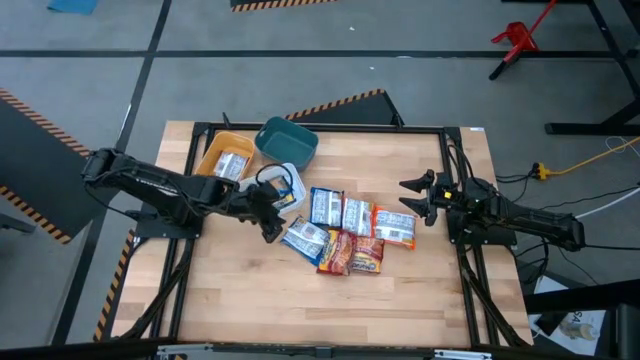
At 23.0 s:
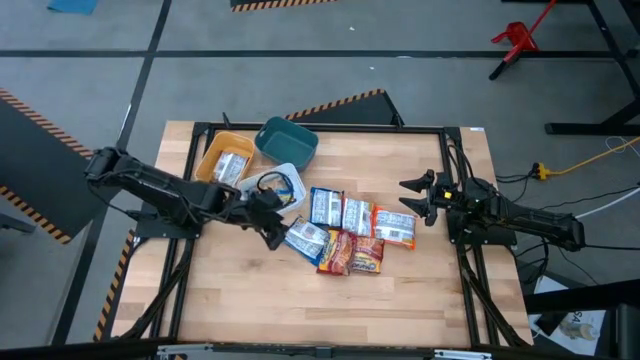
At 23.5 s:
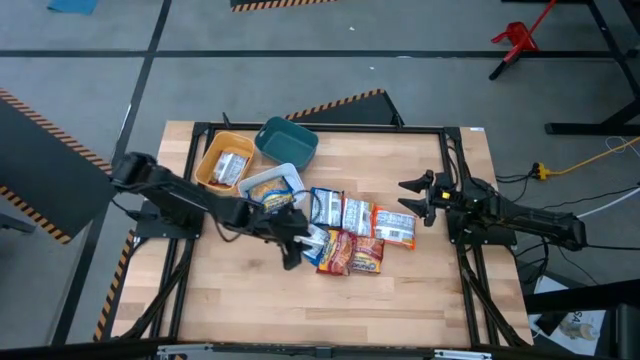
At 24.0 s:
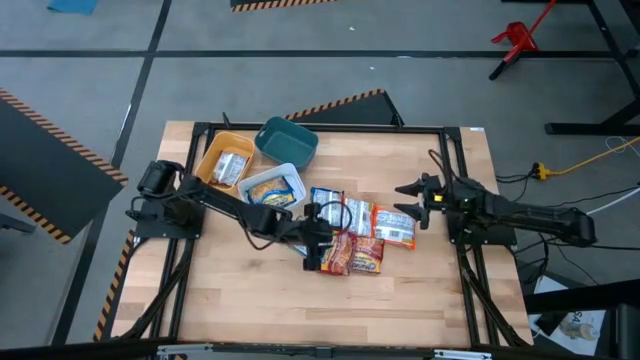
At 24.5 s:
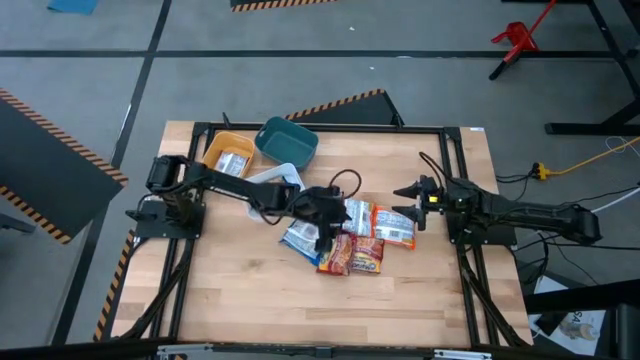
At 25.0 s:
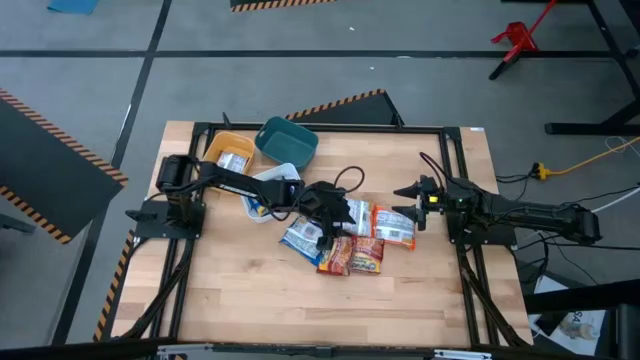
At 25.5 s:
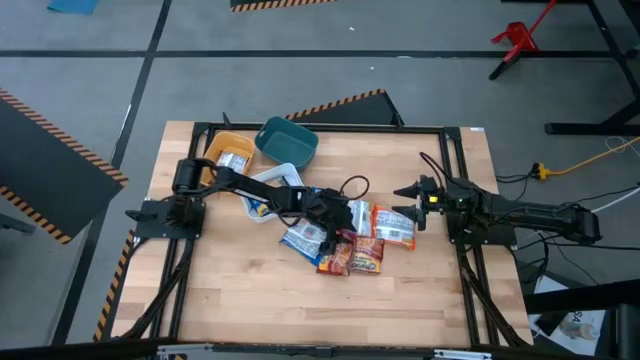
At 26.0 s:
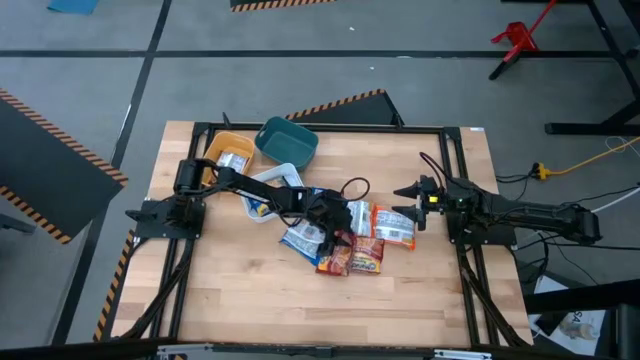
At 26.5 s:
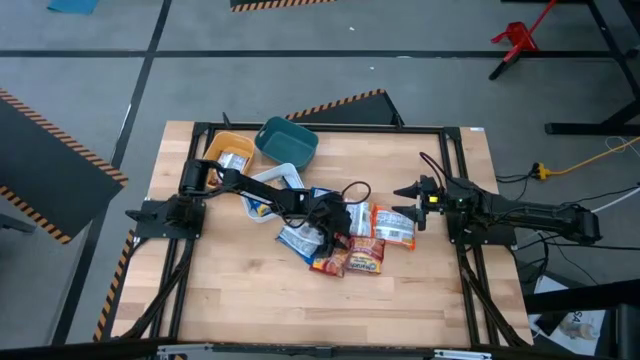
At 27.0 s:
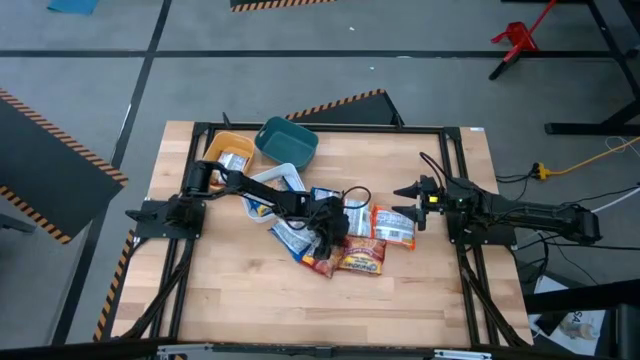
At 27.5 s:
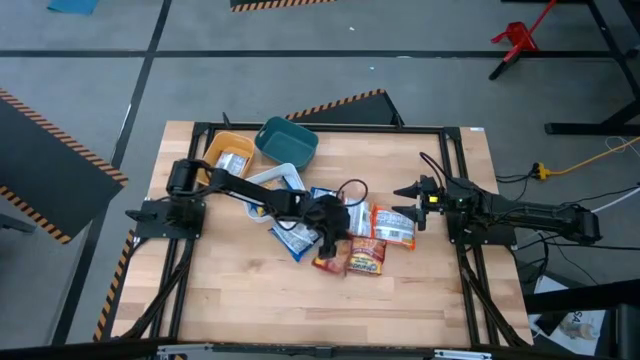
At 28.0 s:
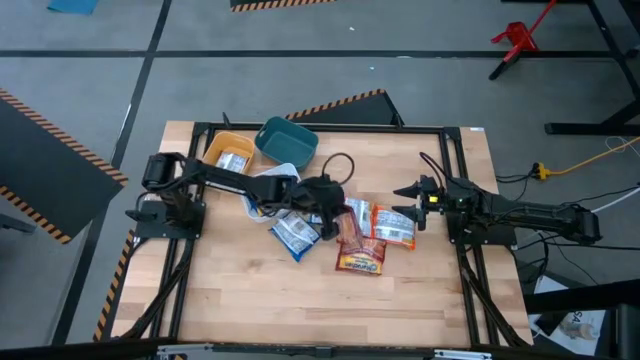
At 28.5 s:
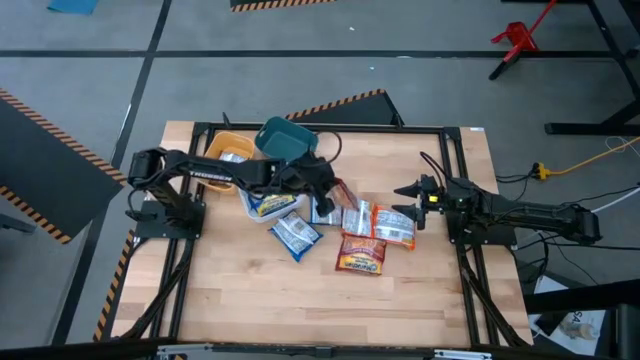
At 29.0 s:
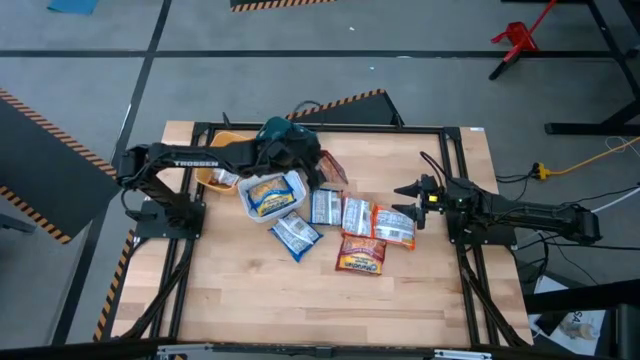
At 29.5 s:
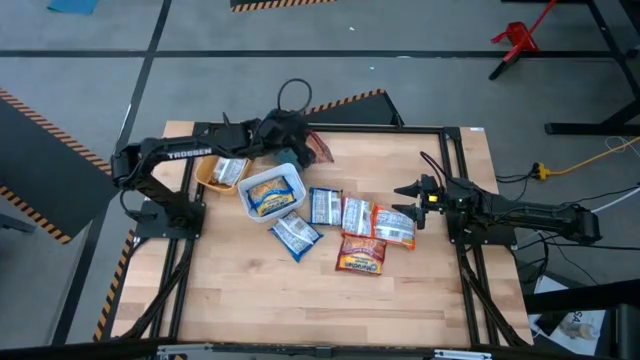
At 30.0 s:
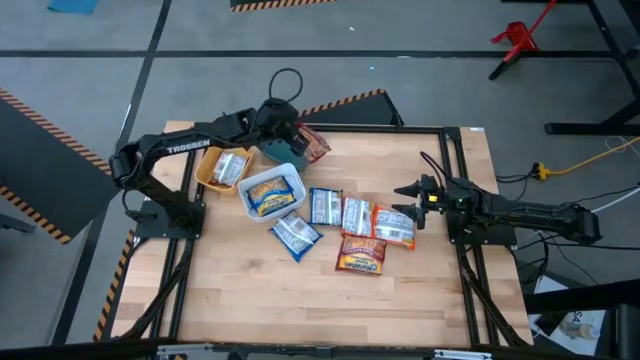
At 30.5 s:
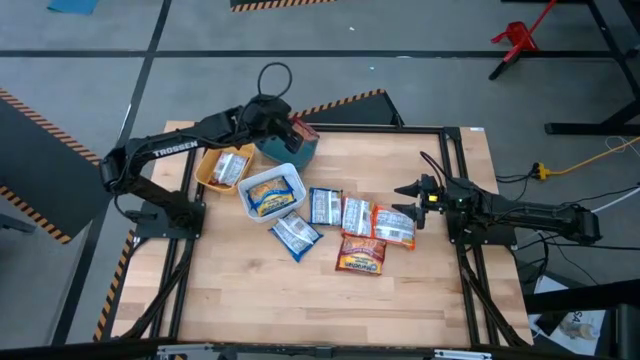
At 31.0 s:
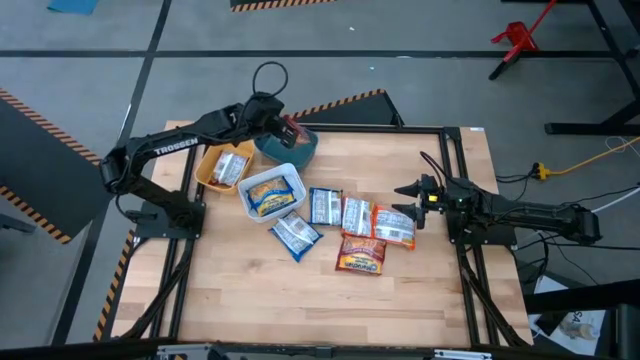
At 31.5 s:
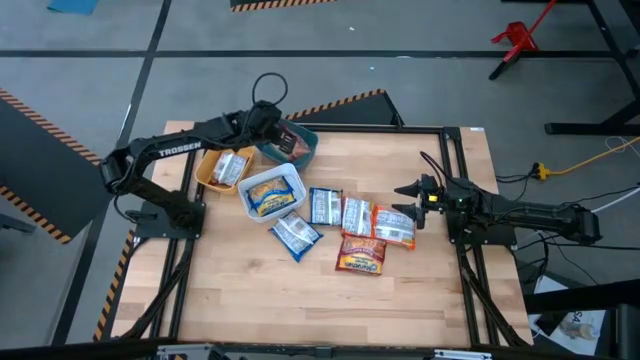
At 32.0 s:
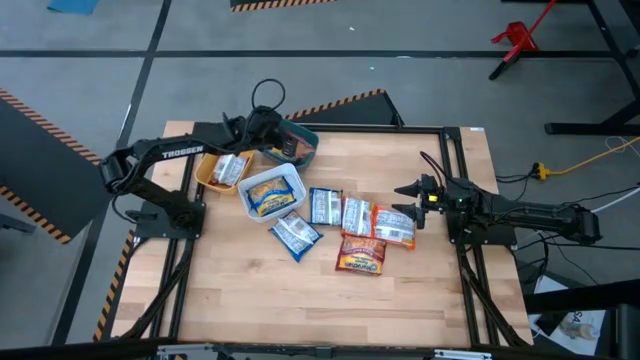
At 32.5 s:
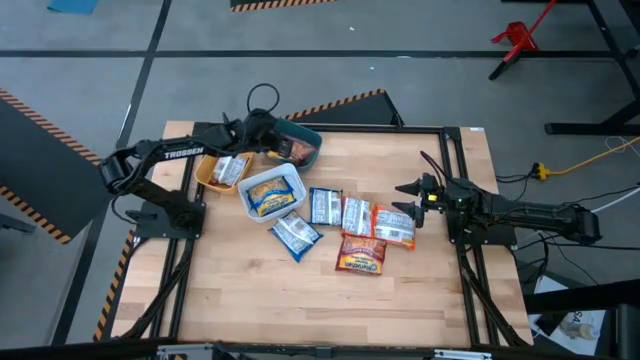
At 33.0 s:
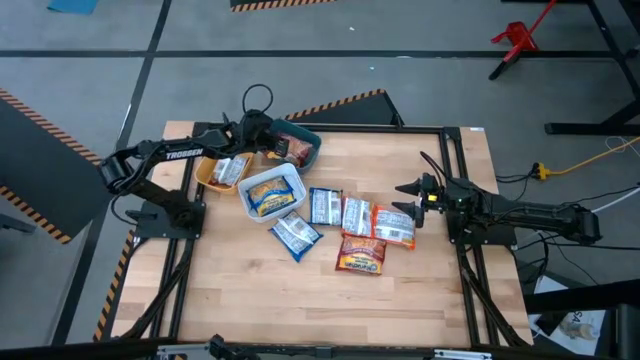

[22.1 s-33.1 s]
Task: Sort Maruchan noodles
Put the left red noodle into the blue bin

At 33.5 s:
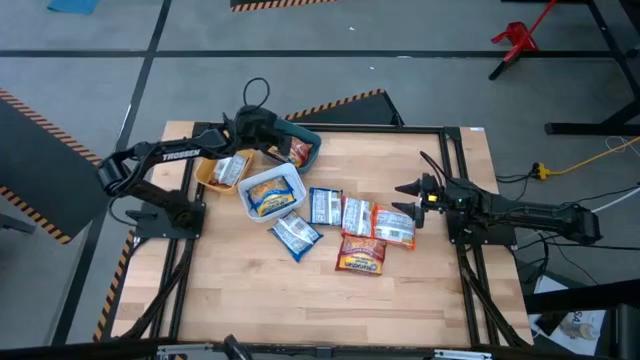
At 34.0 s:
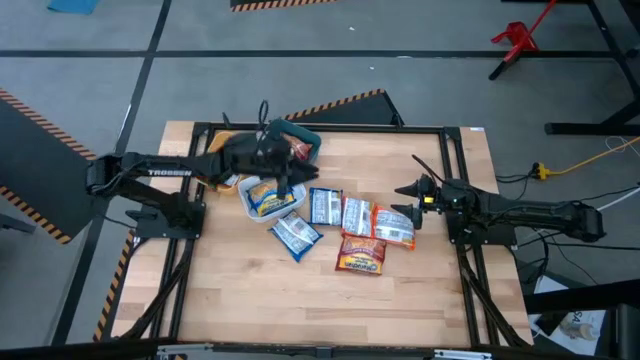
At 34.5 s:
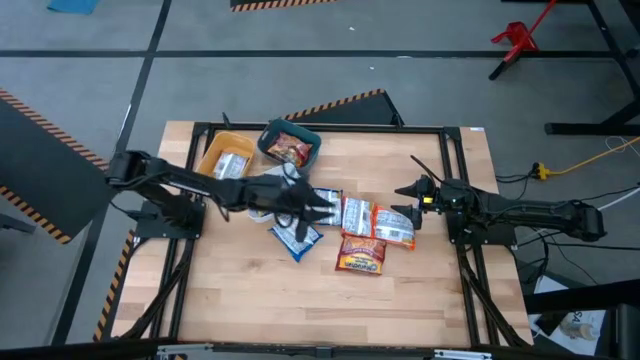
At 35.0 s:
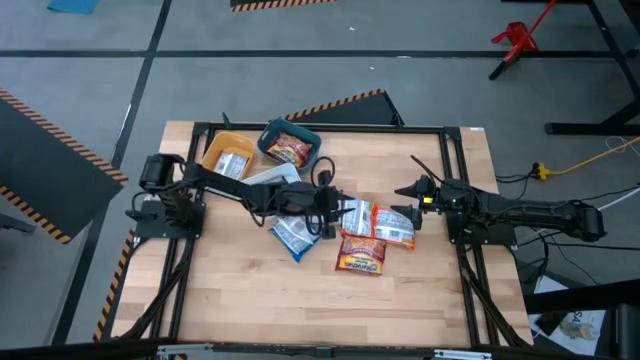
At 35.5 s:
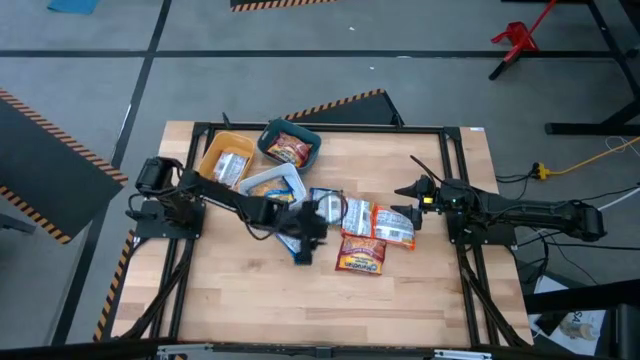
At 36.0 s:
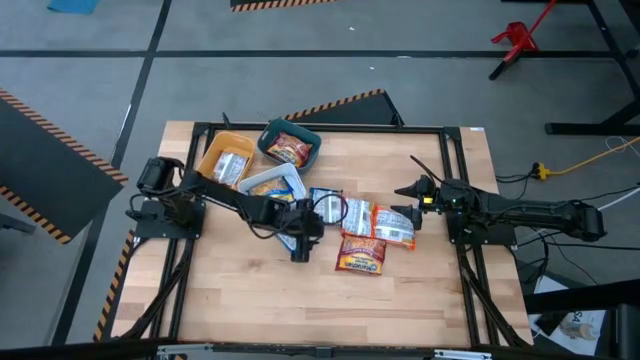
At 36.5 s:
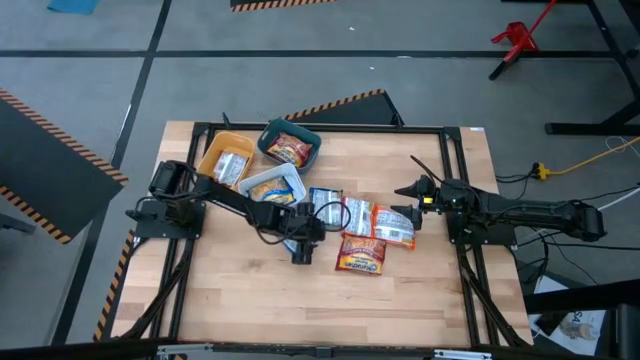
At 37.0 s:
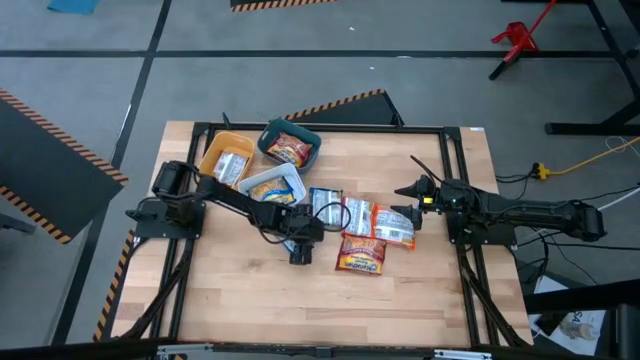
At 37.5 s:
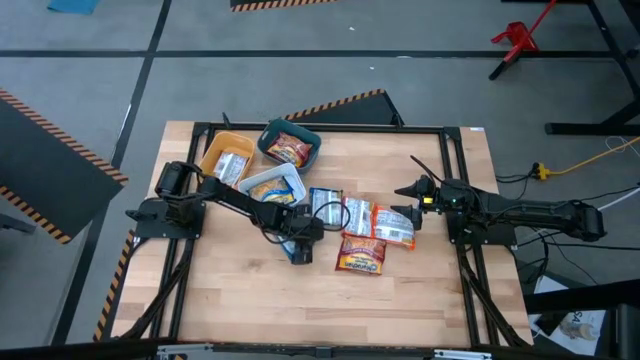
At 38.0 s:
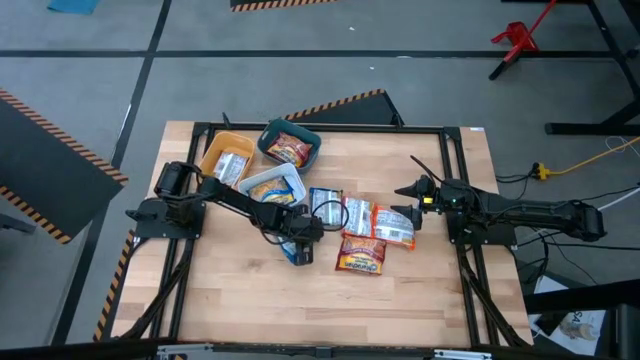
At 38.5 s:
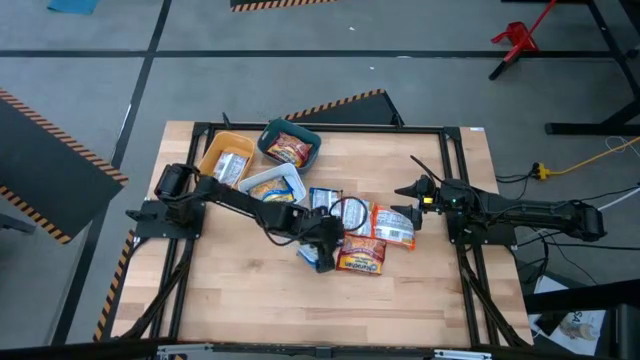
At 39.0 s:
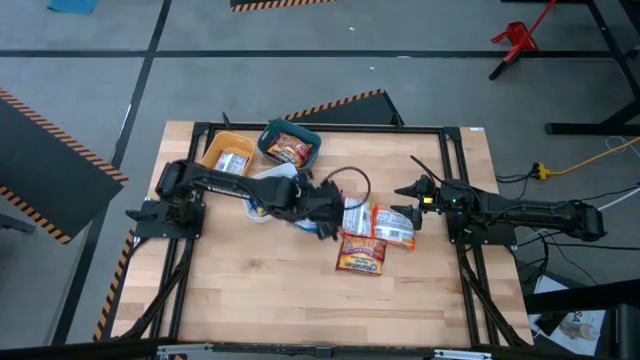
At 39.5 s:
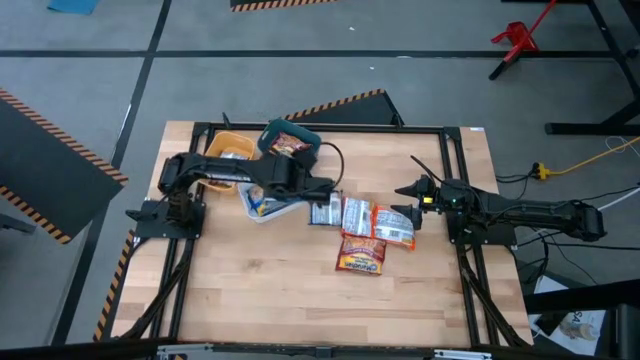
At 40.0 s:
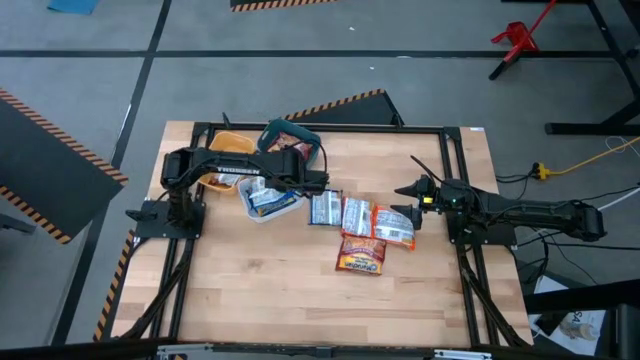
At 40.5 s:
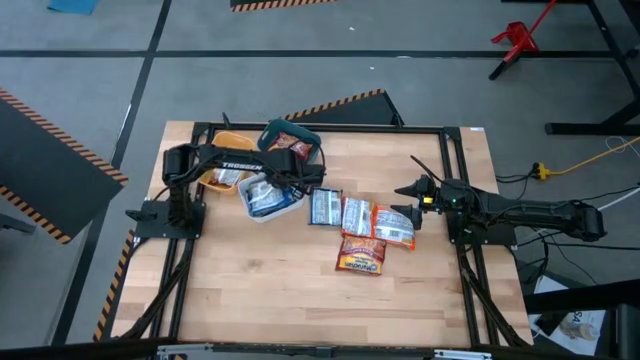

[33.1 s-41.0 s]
Put the bottom blue noodle into the white bin

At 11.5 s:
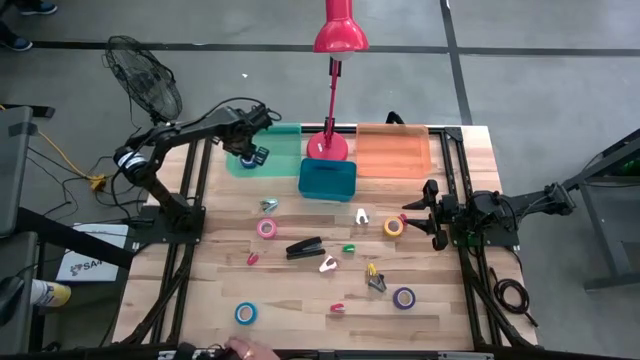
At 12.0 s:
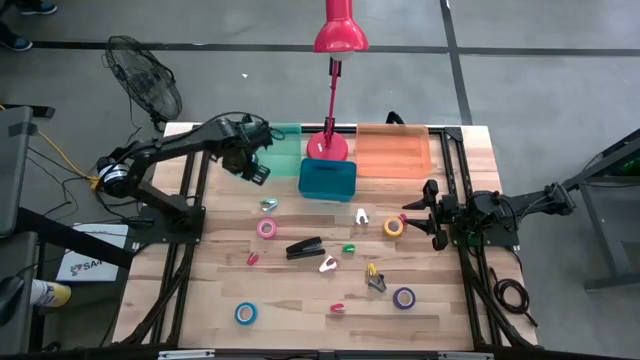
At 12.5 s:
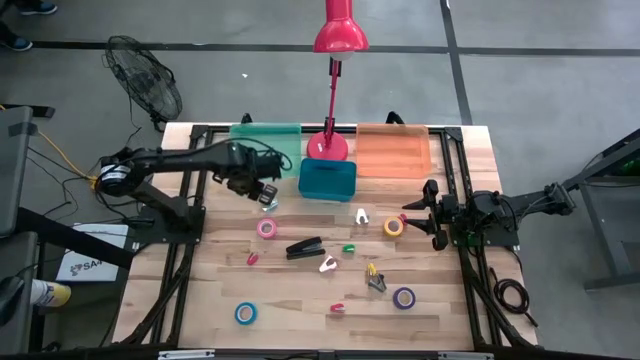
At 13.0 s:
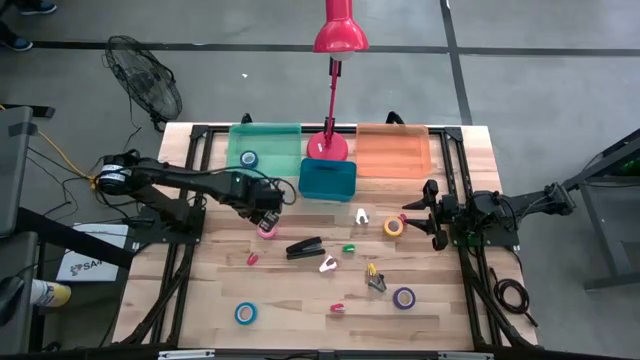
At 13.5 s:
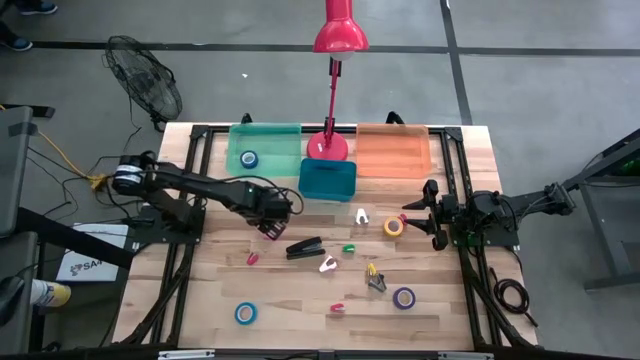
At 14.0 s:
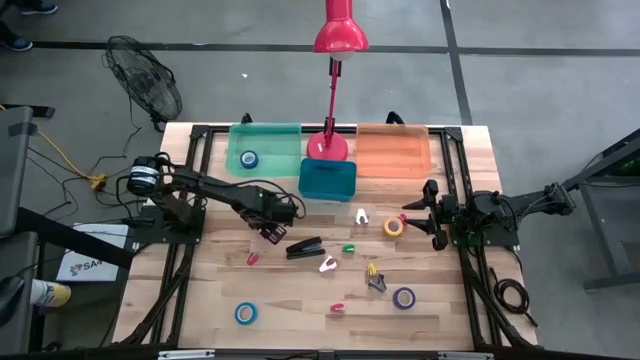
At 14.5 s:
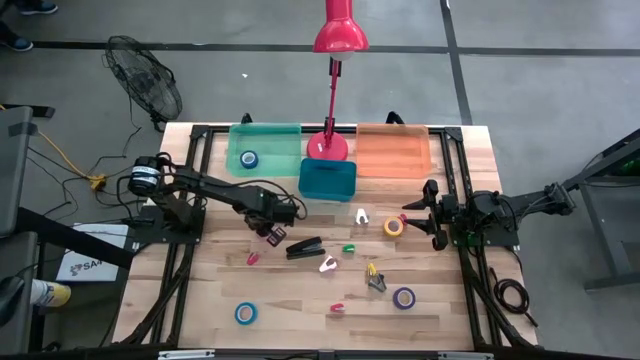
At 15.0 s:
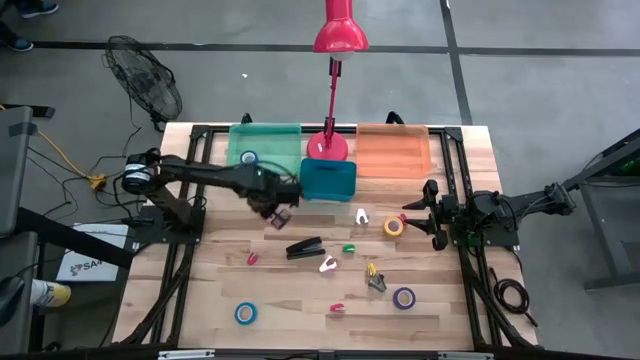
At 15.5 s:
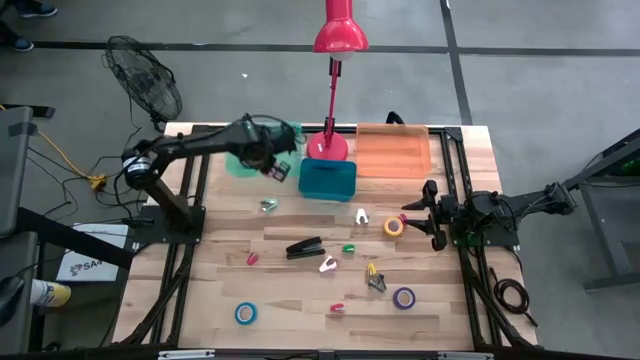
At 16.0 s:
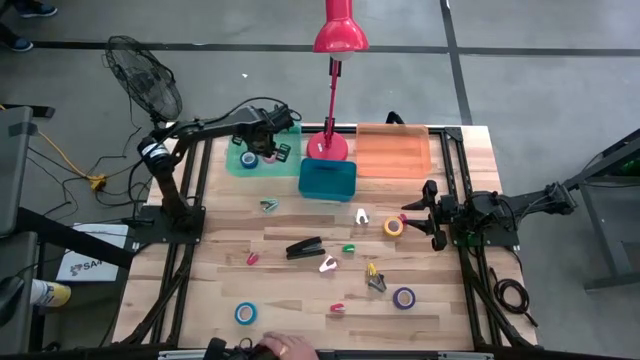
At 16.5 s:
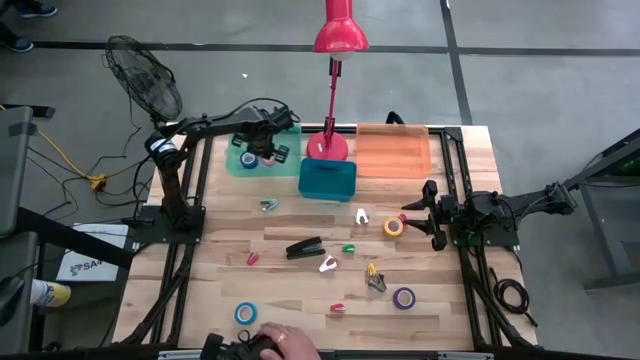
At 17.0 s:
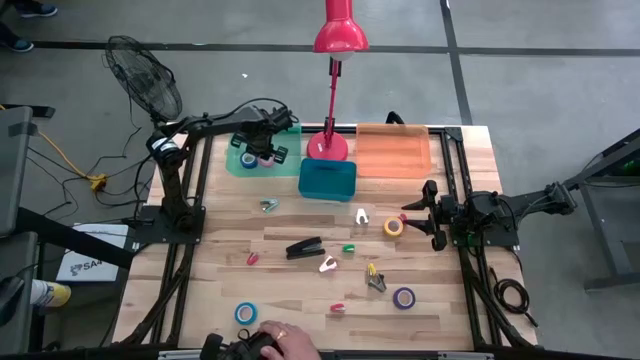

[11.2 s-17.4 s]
Task: Pick and place Stapler, Stapler remover, tape
Put the pink tape into the light green bin
